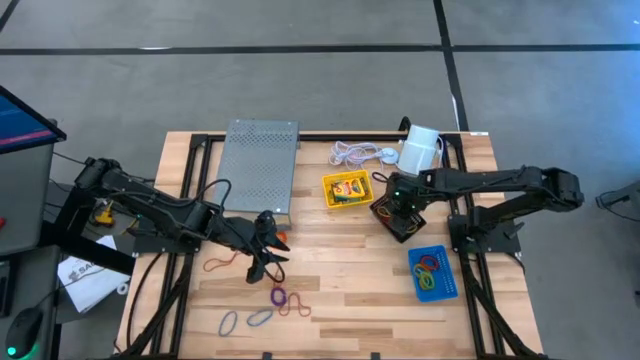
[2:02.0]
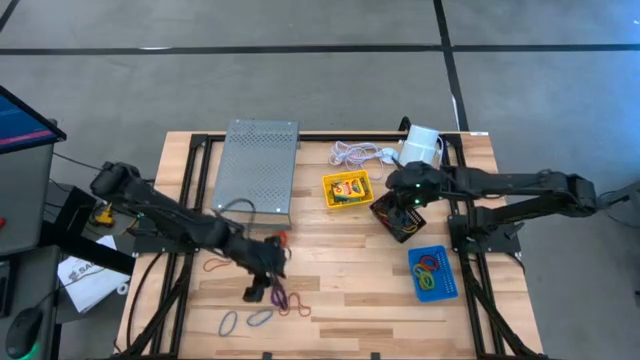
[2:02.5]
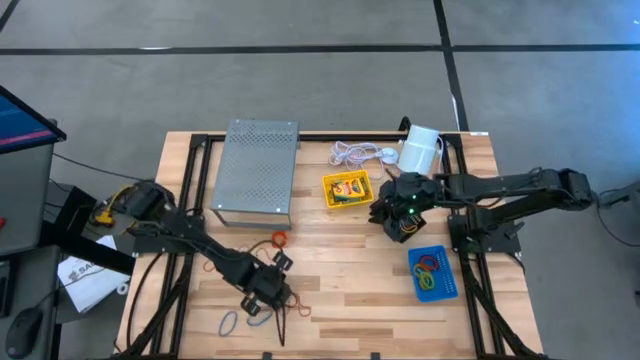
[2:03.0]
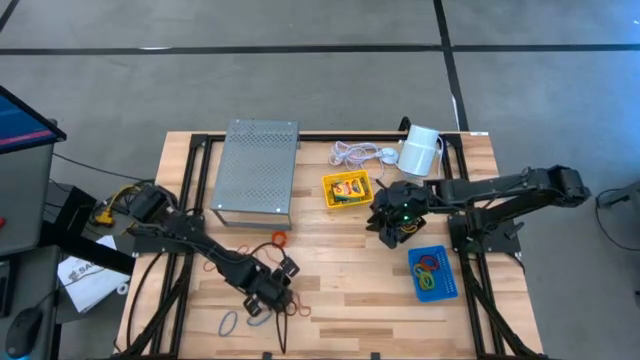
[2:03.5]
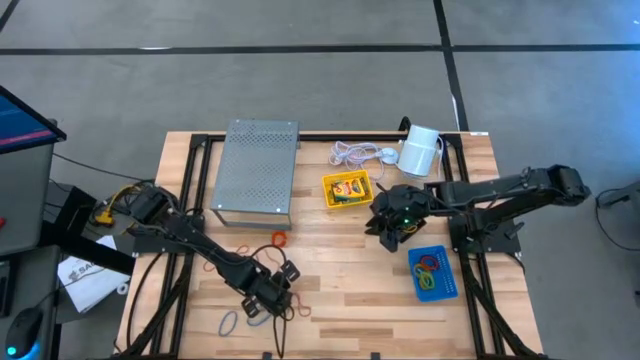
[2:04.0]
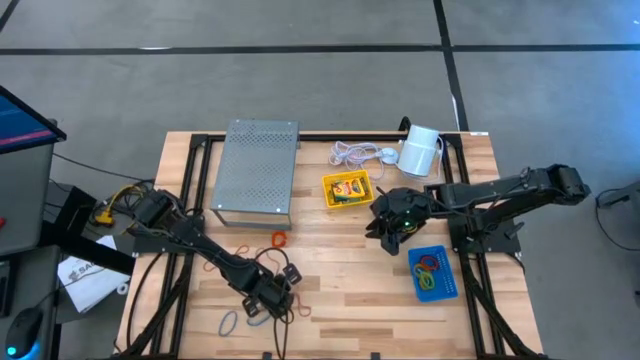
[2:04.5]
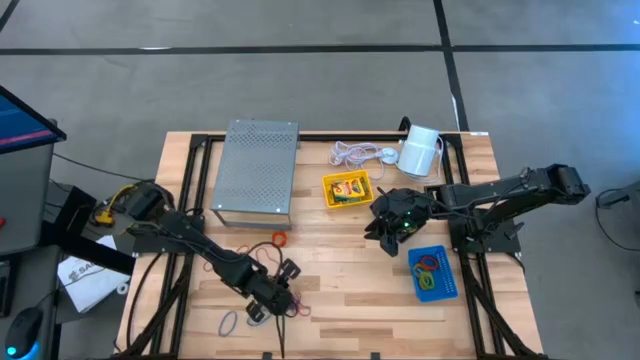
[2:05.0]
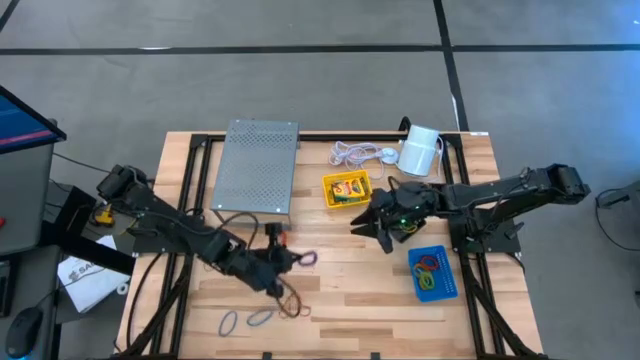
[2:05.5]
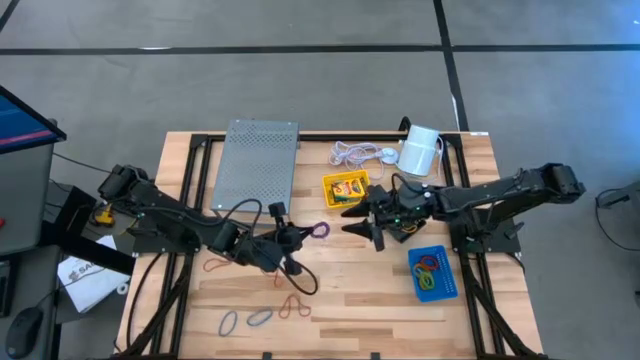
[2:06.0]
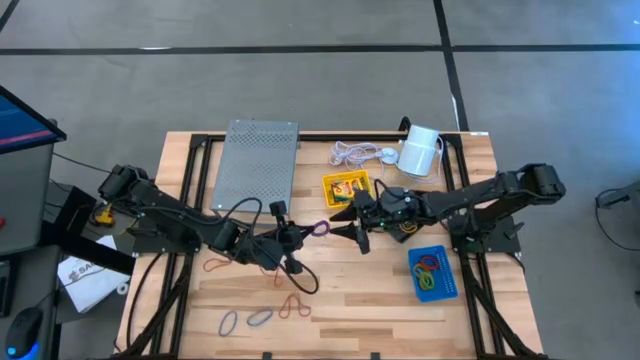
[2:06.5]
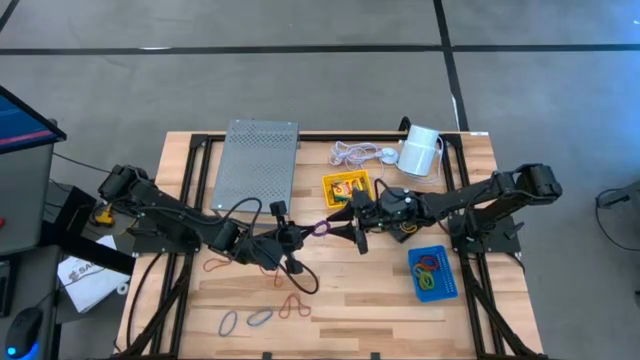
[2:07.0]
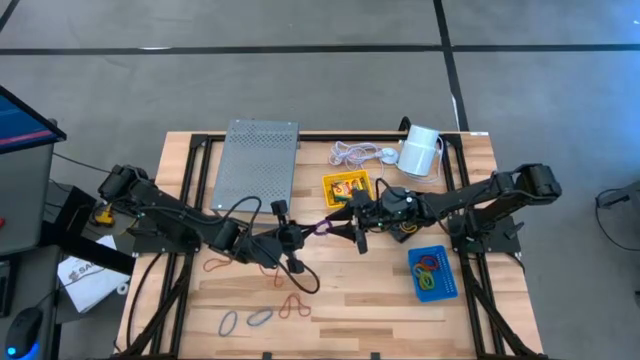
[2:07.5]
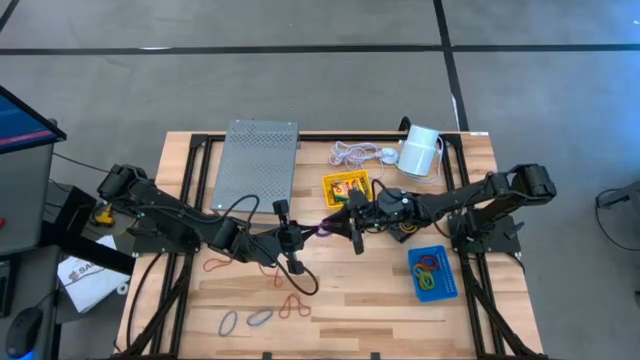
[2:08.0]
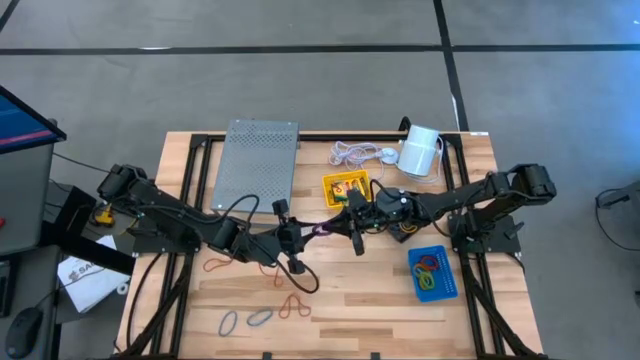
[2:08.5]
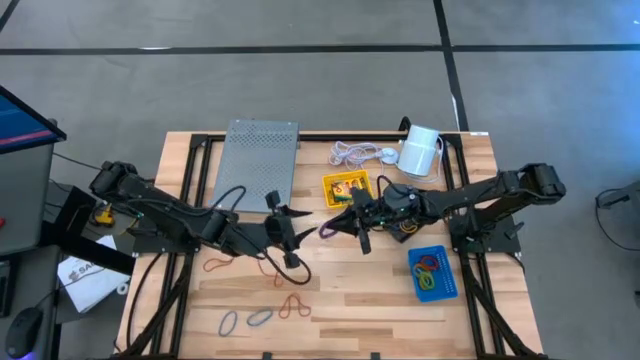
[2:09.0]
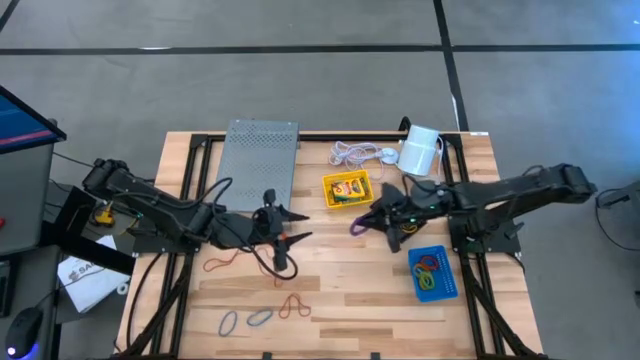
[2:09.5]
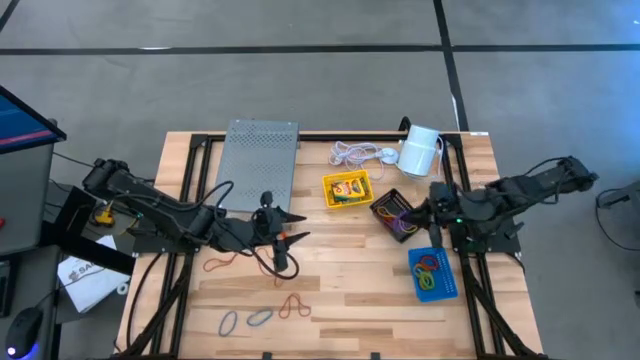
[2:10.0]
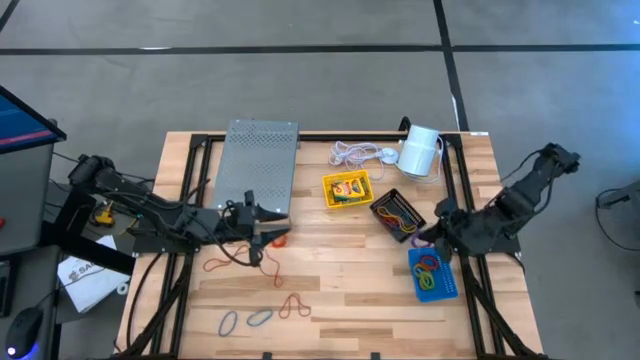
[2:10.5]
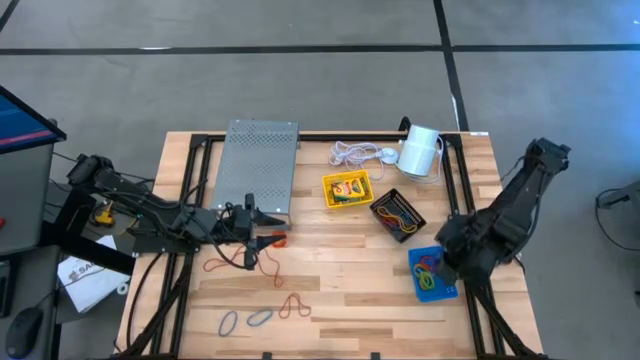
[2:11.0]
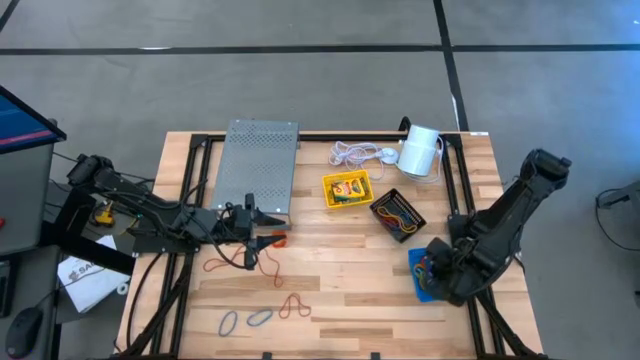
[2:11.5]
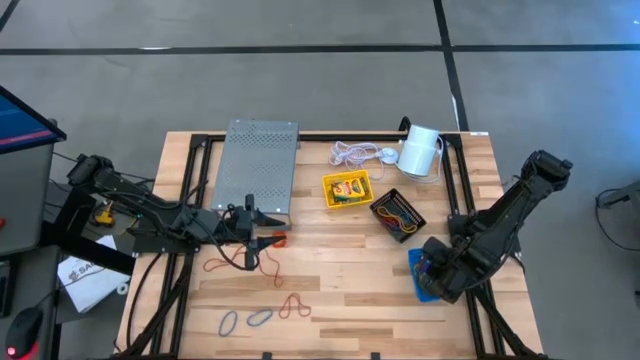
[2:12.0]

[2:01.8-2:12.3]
Task: Pick & Place Office Desk Supplies
Put the purple spring keychain into the blue bin

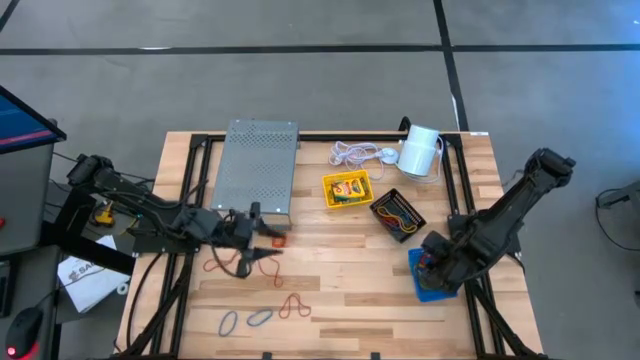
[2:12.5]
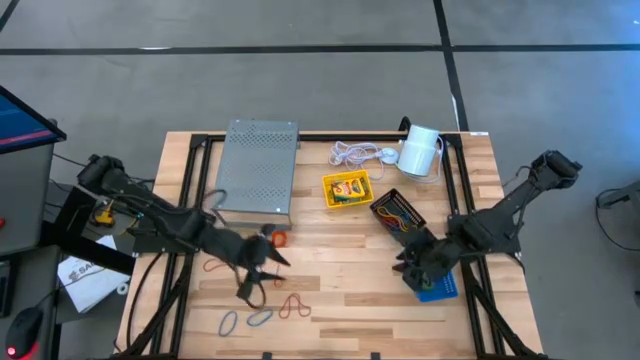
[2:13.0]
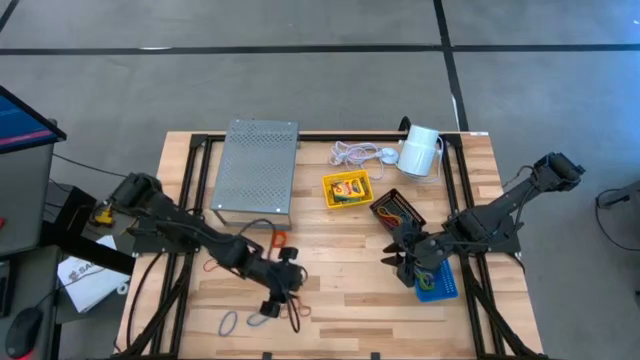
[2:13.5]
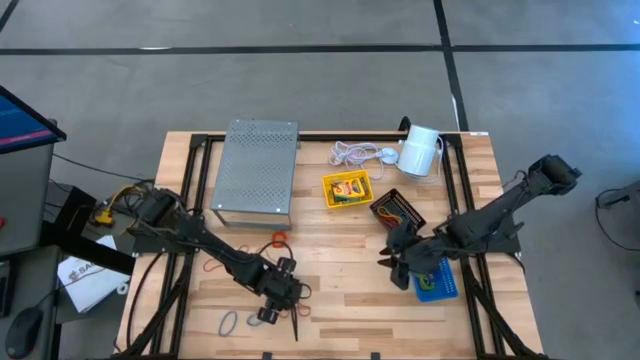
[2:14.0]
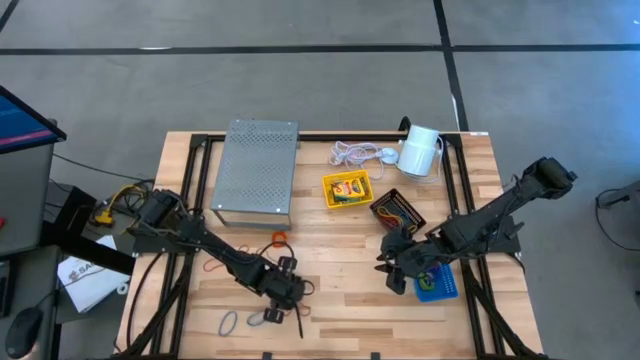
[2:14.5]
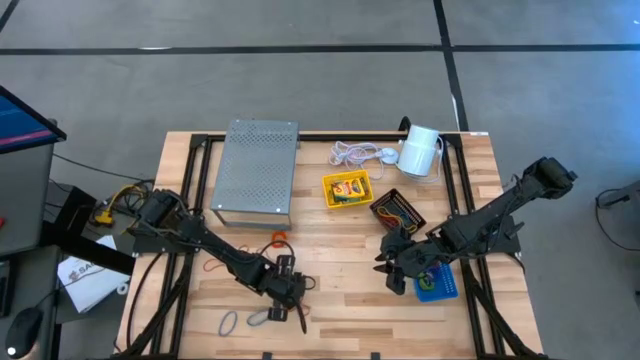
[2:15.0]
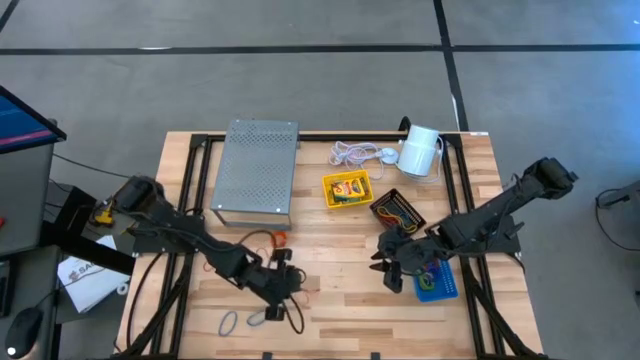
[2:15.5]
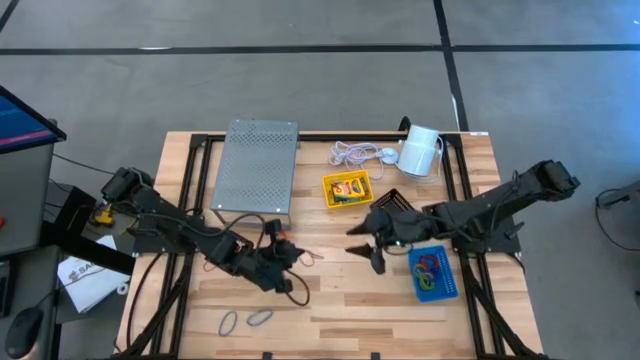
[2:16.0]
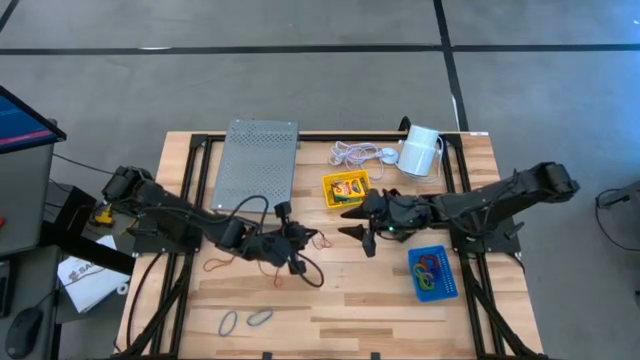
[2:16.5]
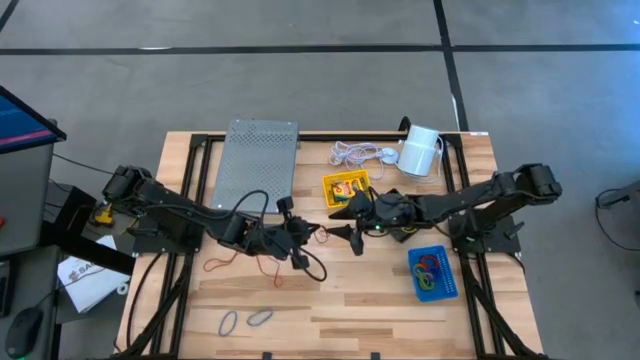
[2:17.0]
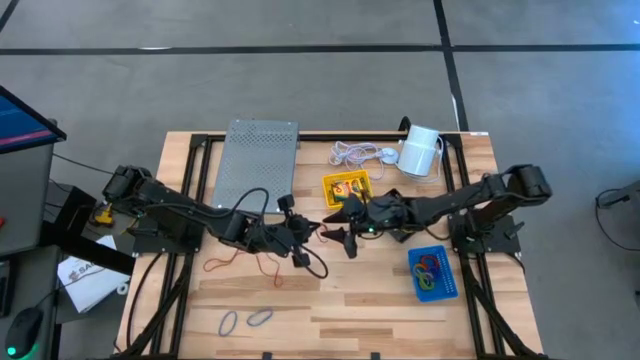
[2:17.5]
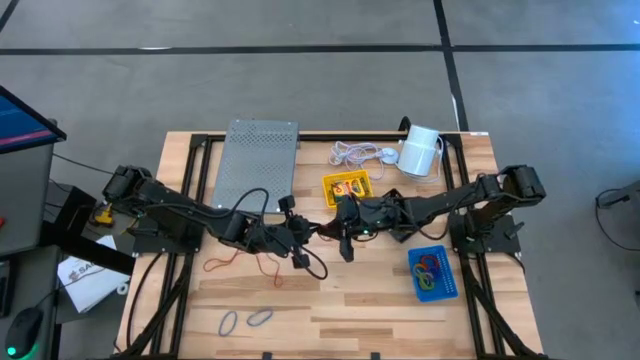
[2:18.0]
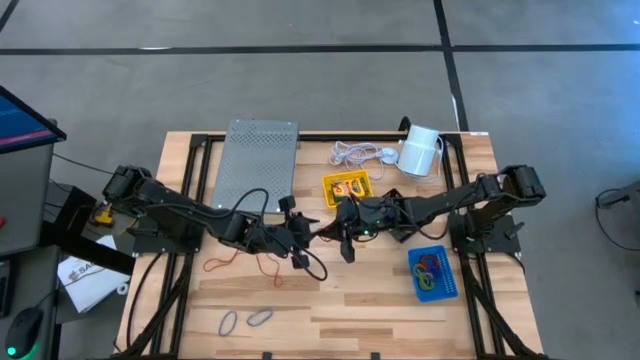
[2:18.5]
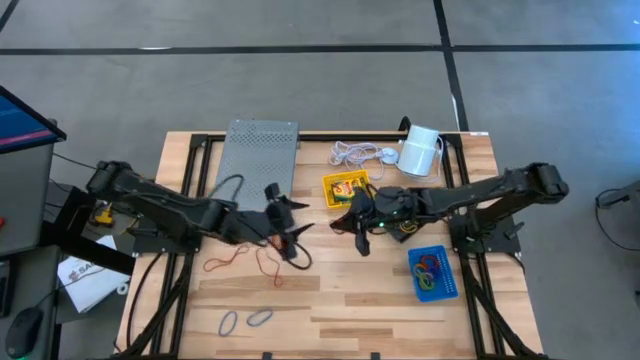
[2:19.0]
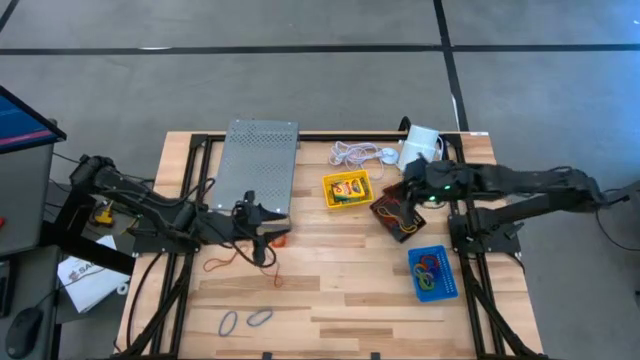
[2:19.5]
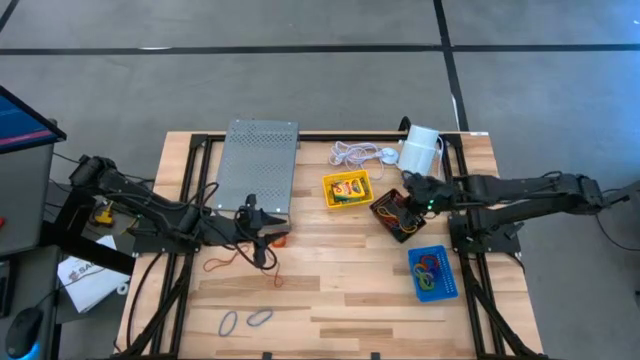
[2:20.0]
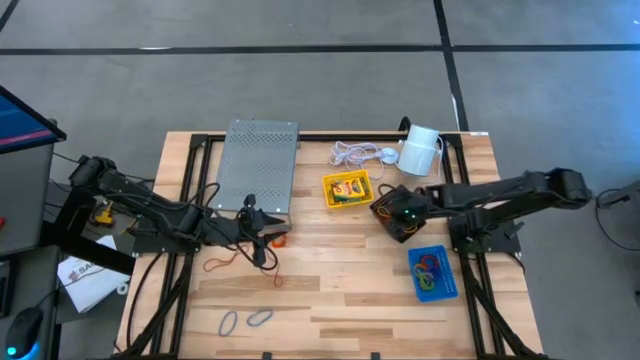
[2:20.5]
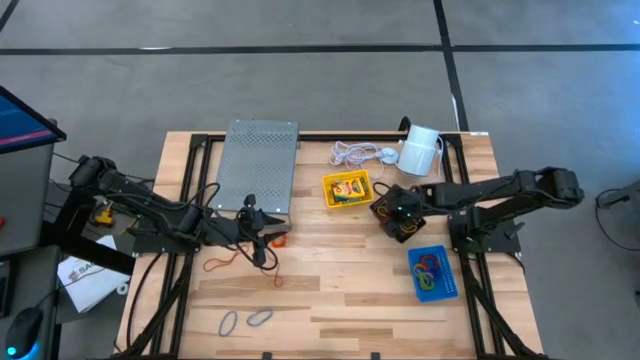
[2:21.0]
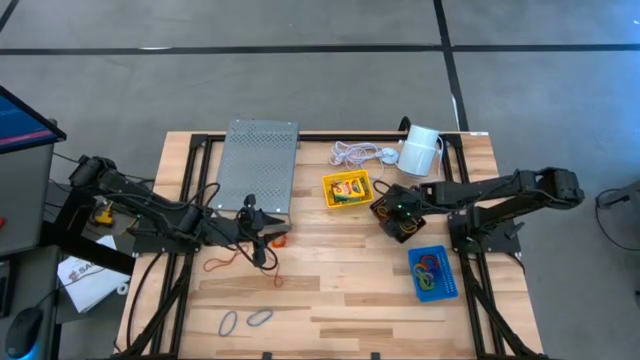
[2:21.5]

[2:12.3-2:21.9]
Put the red rubber band into the black bin
